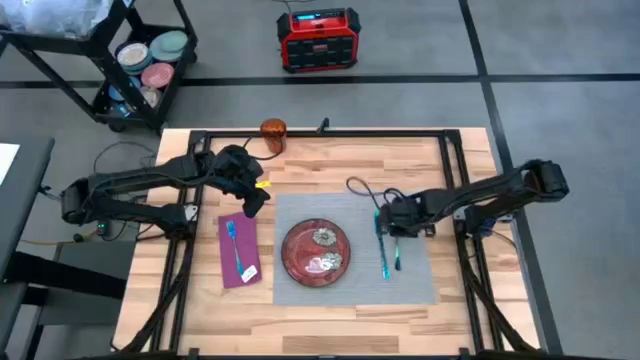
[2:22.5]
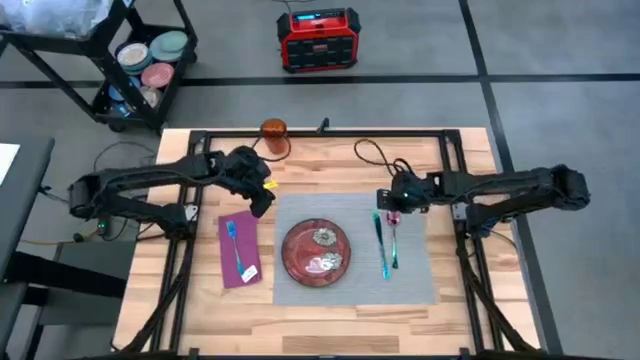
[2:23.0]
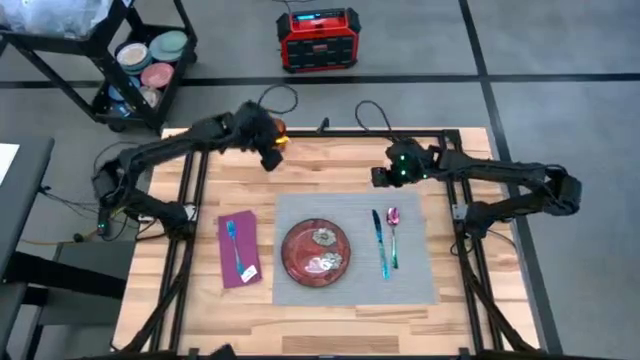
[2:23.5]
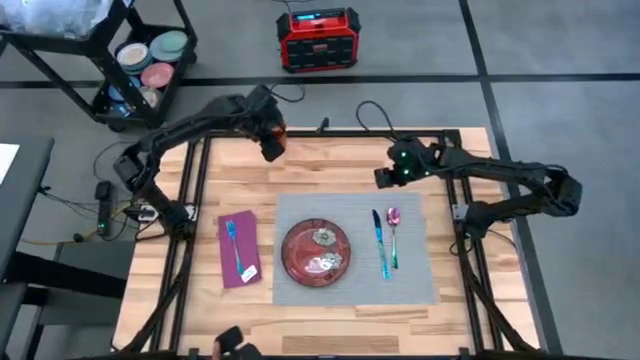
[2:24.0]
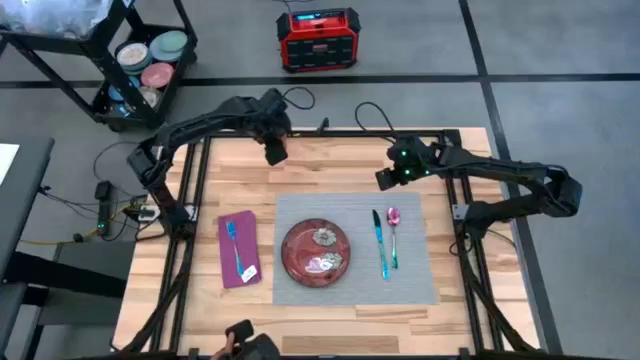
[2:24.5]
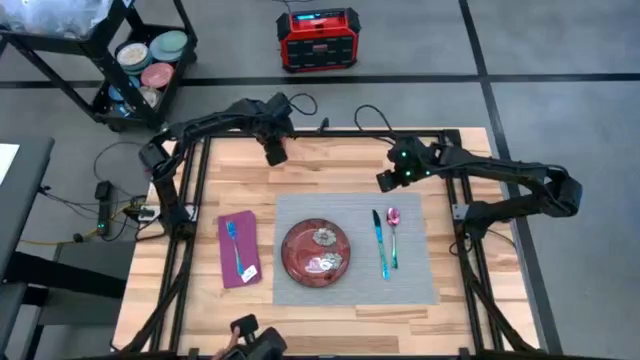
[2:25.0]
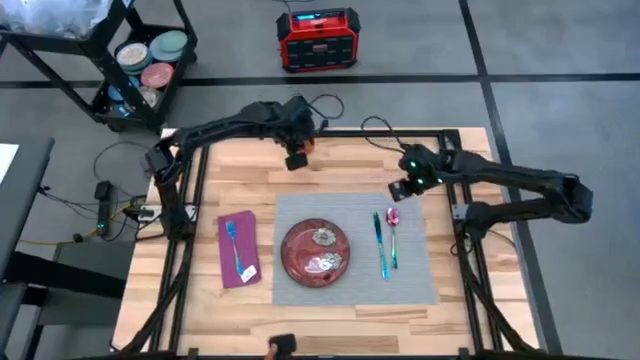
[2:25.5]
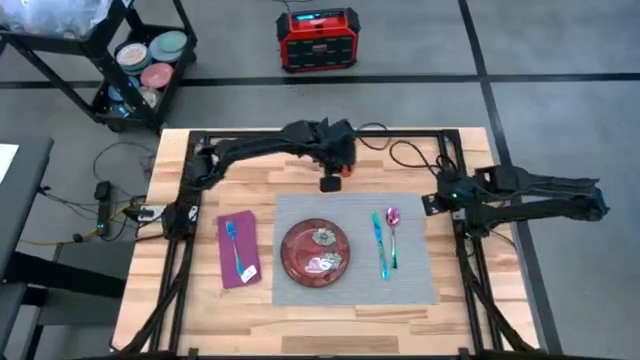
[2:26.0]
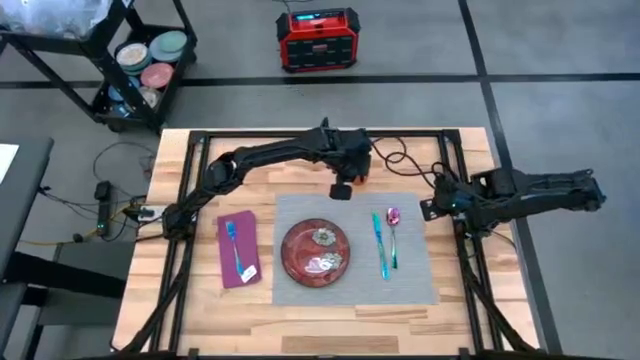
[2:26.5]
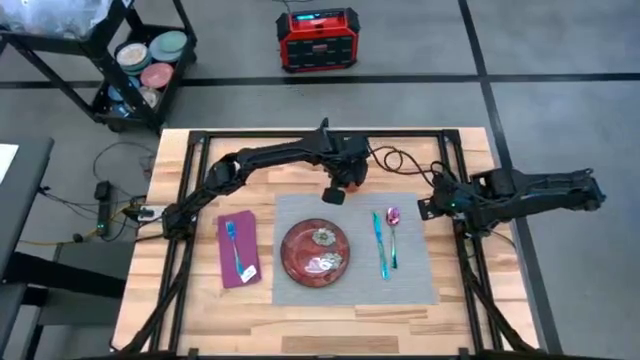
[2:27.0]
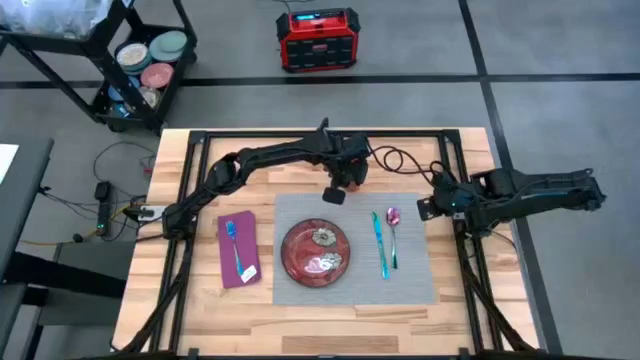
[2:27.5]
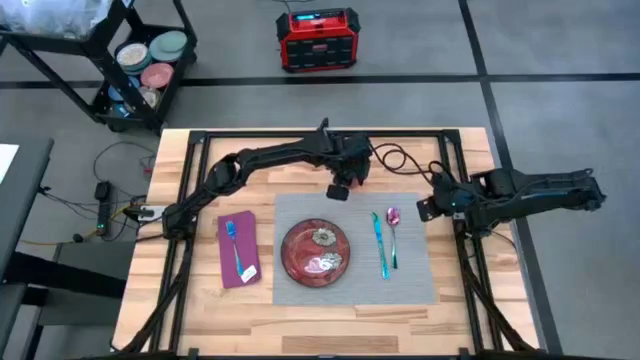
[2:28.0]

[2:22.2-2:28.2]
Task: Set table place
Move the table cup to the top of the gray placemat

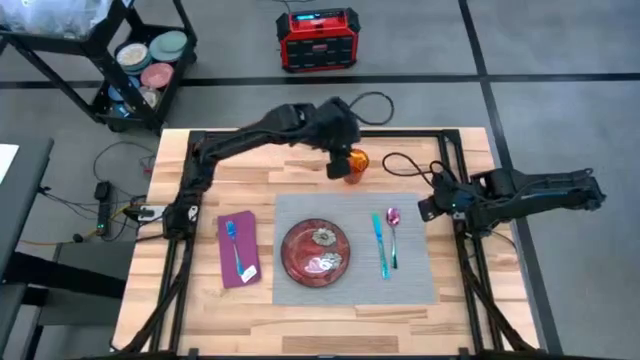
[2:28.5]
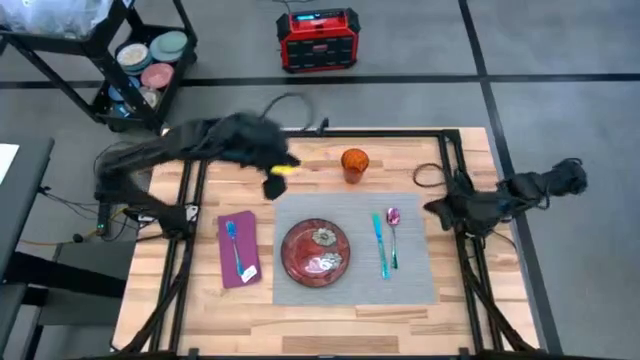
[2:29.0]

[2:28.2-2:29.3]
Return to Home Position

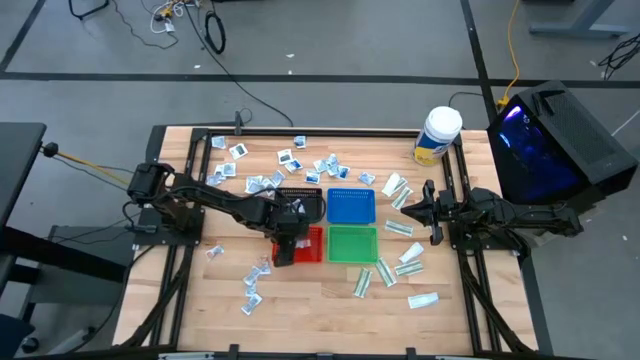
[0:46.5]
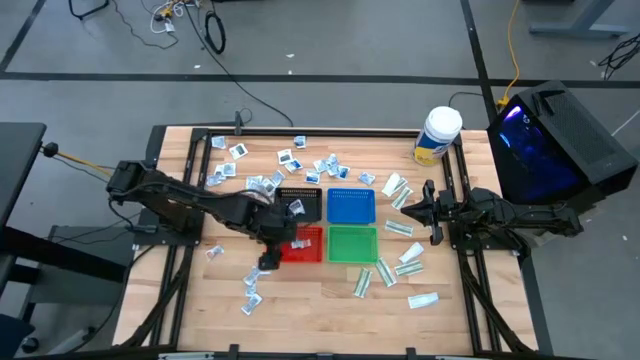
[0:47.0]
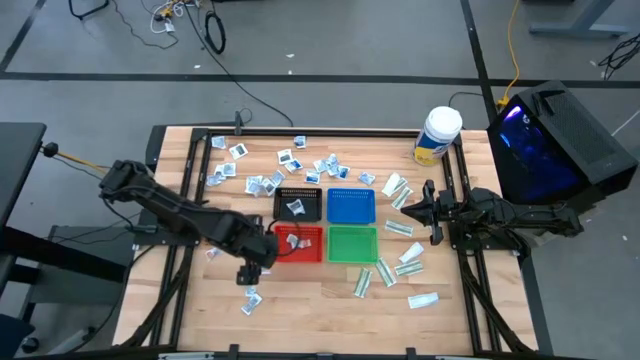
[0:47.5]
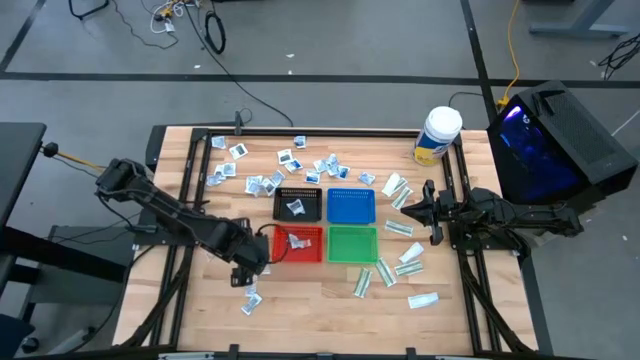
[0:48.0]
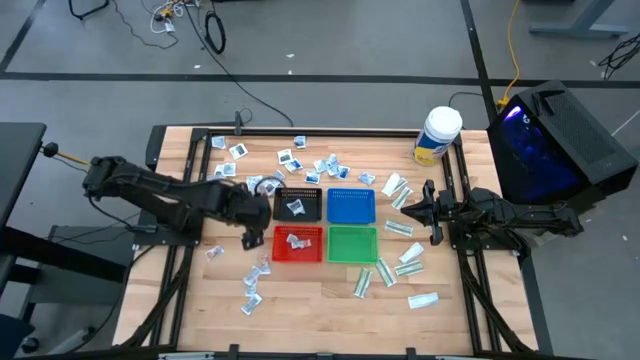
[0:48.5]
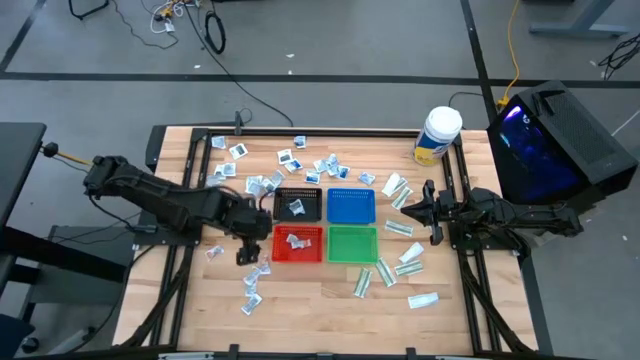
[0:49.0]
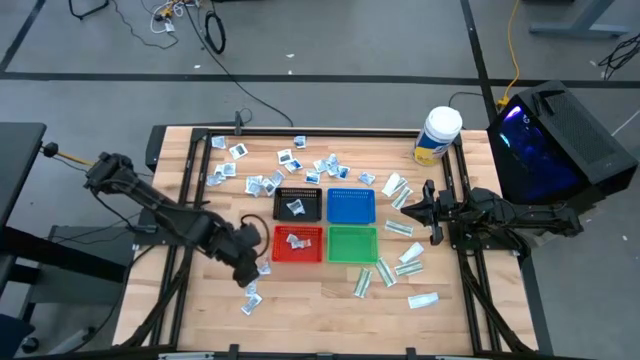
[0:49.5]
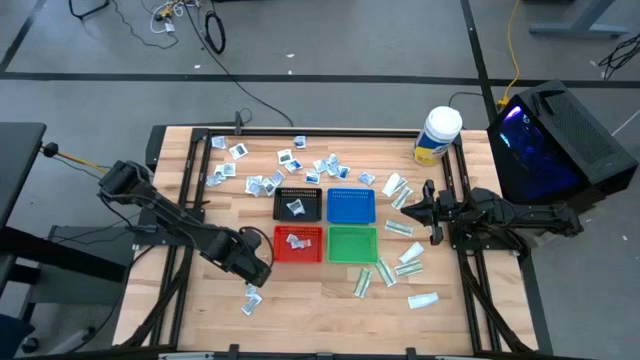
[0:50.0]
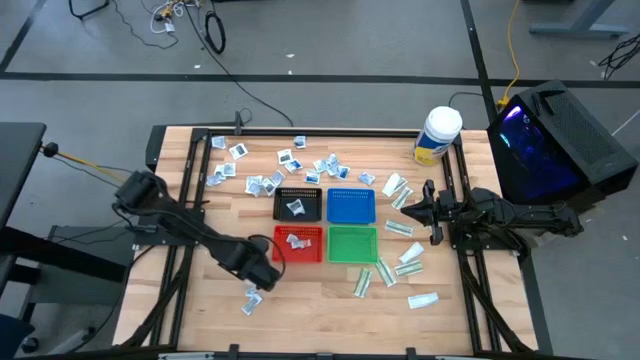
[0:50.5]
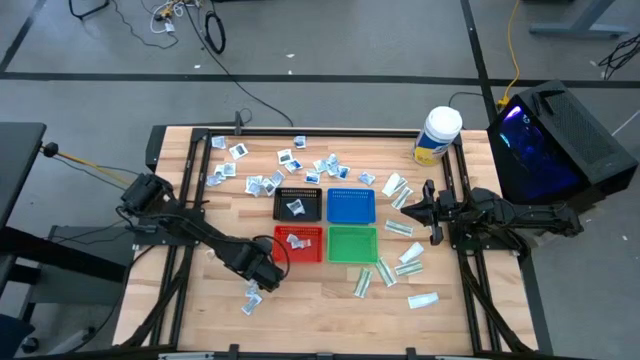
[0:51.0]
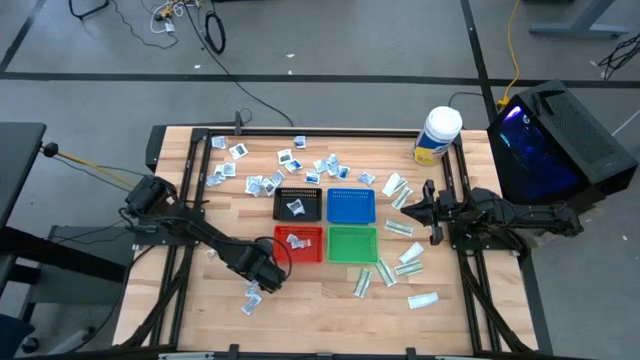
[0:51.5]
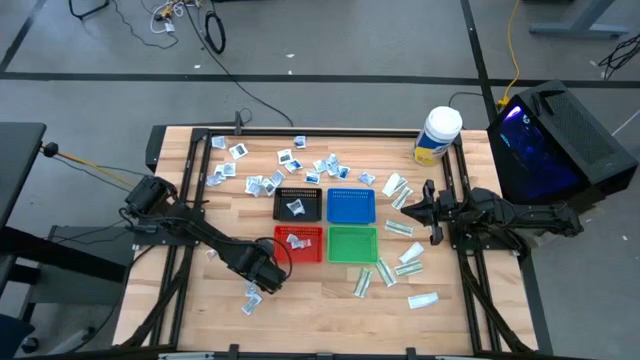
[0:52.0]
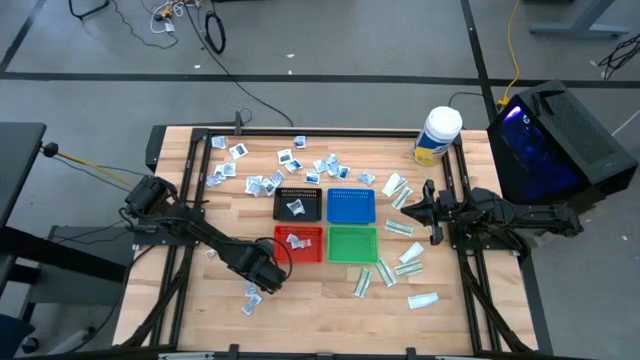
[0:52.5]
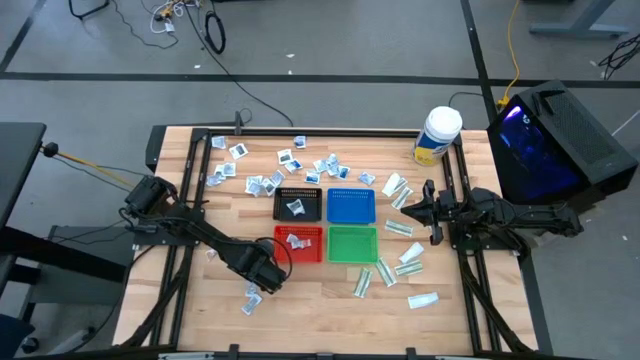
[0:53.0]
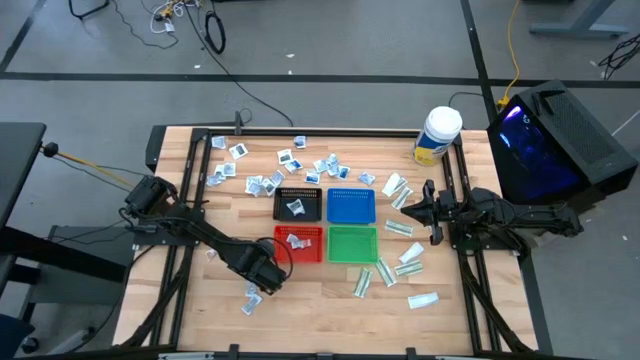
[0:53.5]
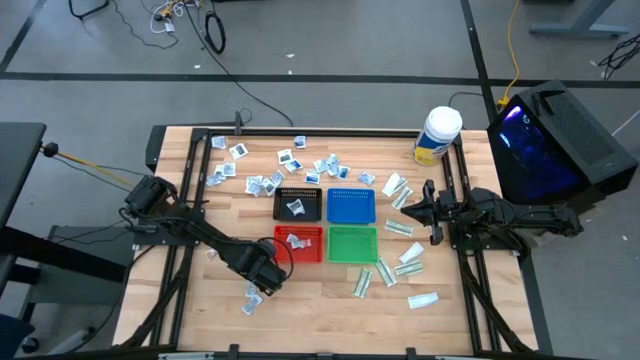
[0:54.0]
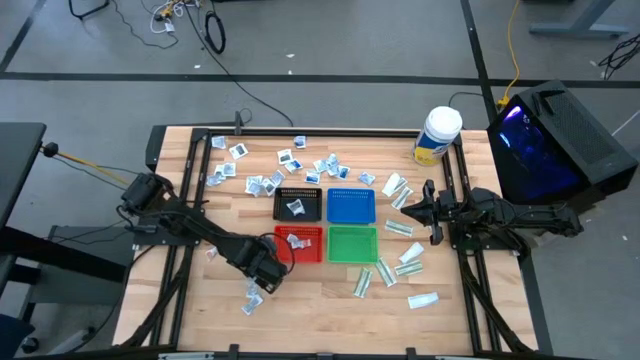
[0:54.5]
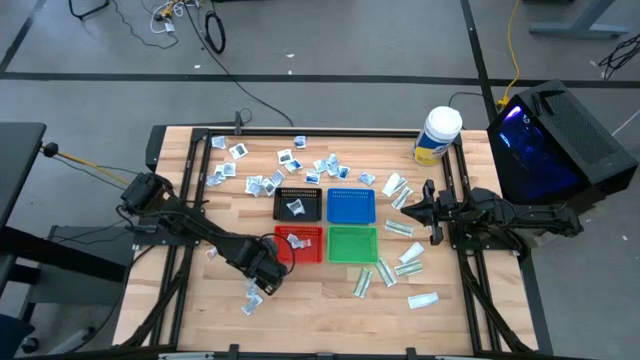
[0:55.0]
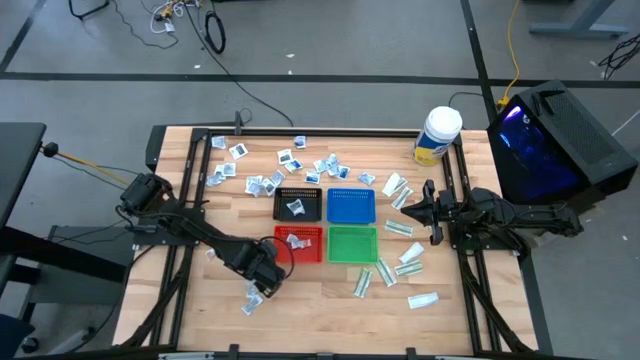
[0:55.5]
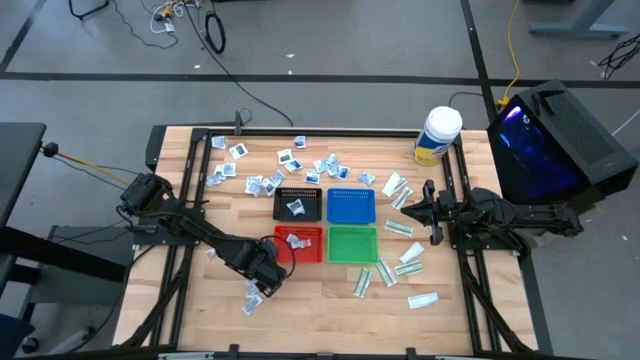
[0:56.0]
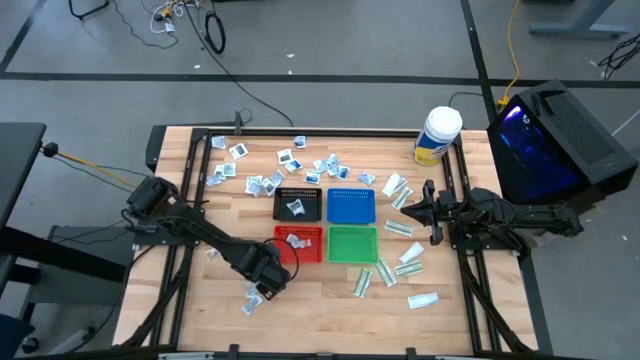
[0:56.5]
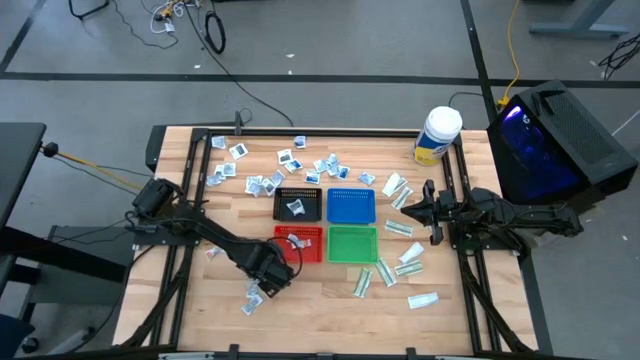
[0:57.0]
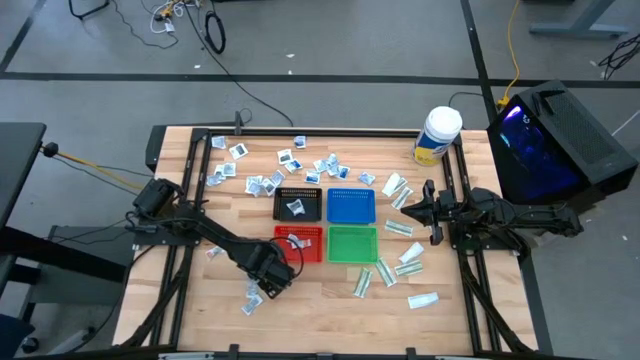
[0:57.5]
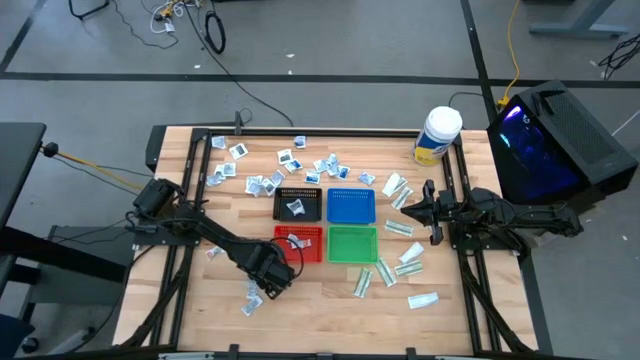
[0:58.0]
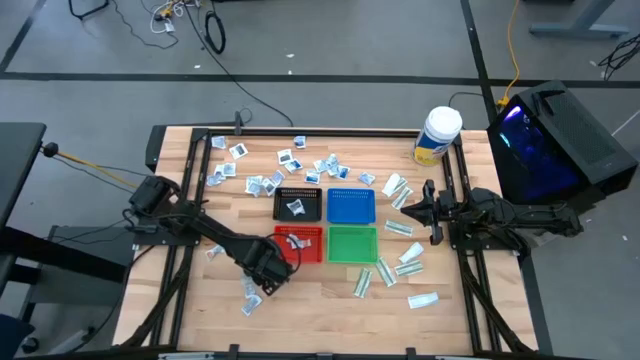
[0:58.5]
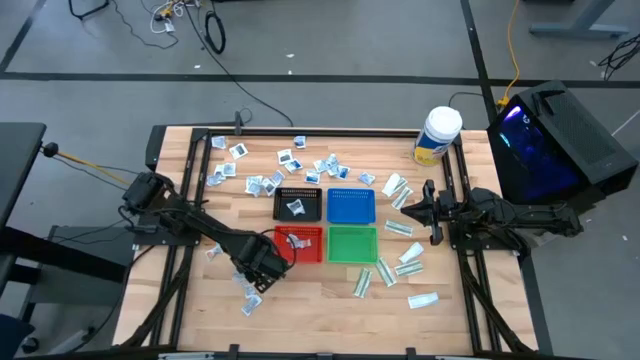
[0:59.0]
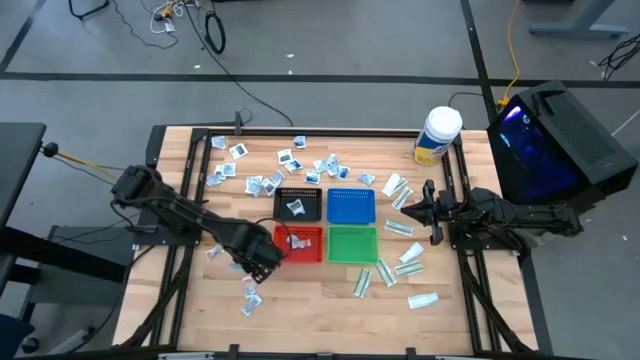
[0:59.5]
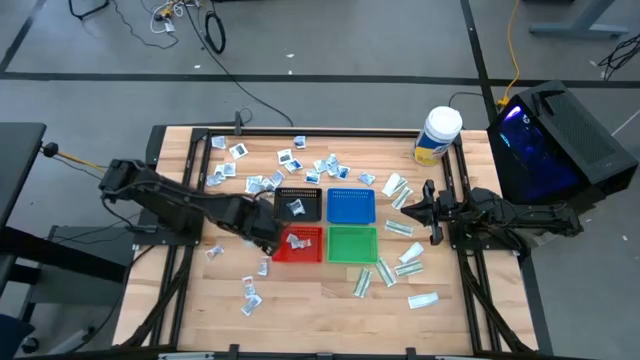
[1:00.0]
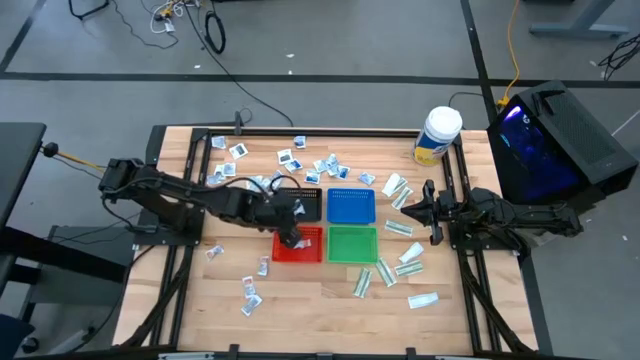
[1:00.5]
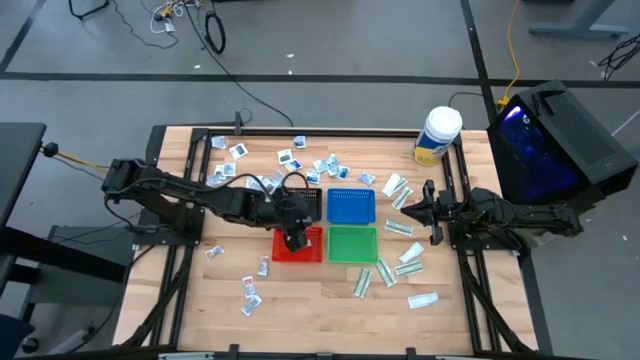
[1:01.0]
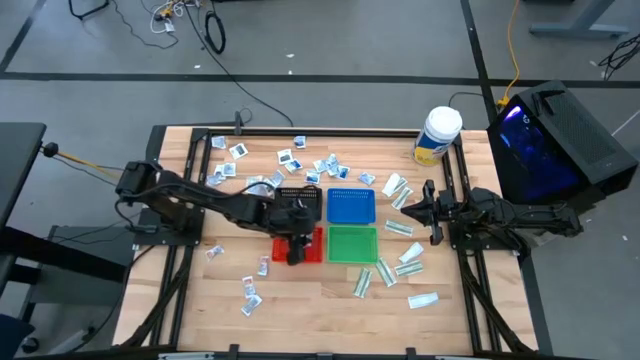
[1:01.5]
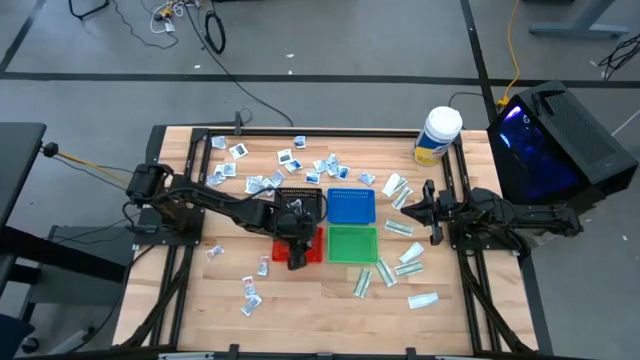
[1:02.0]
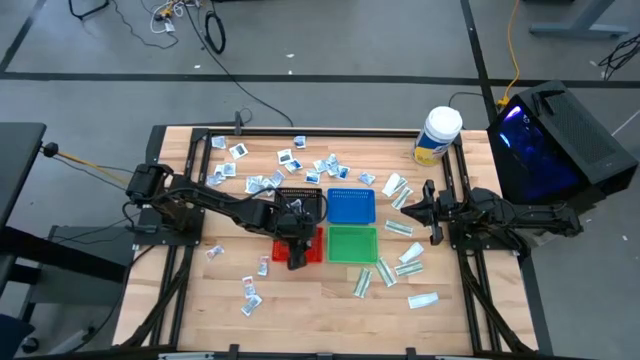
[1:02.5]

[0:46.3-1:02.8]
Task: Pick & Place First Aid Supplies
Put the orange ointment pack into the orange bin
